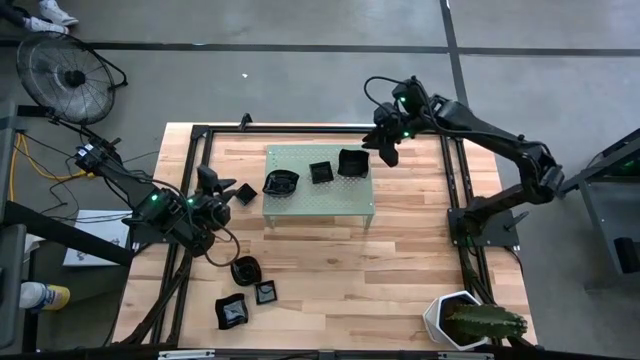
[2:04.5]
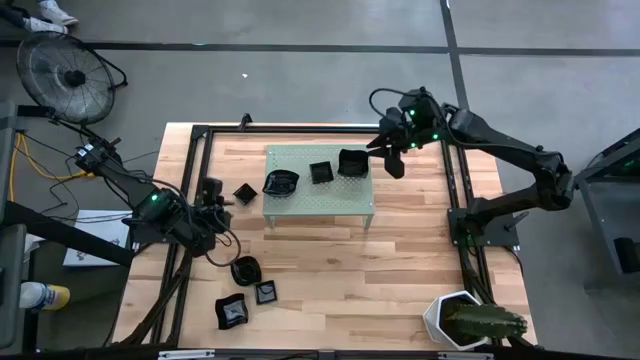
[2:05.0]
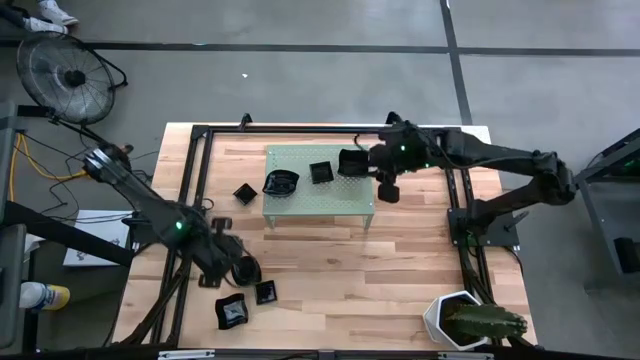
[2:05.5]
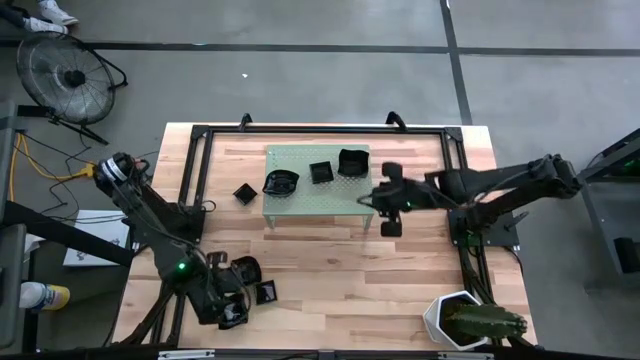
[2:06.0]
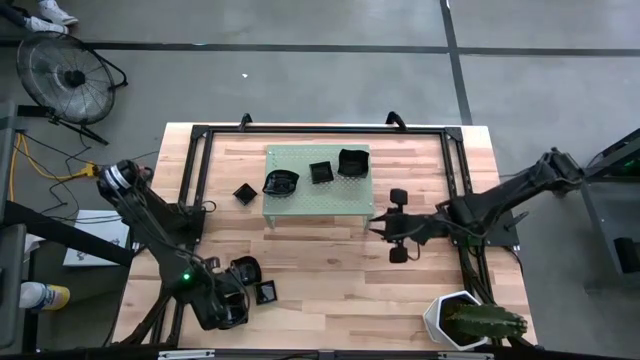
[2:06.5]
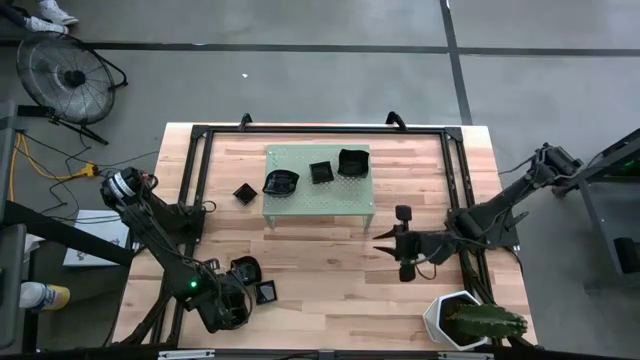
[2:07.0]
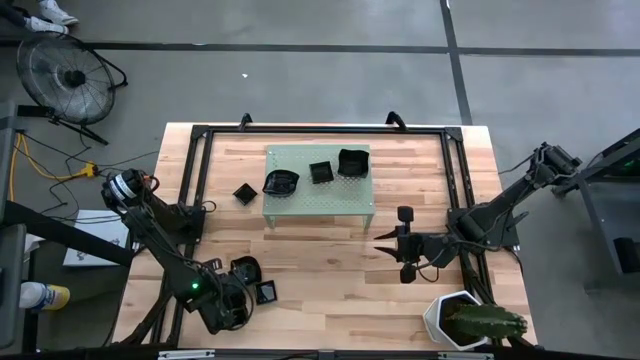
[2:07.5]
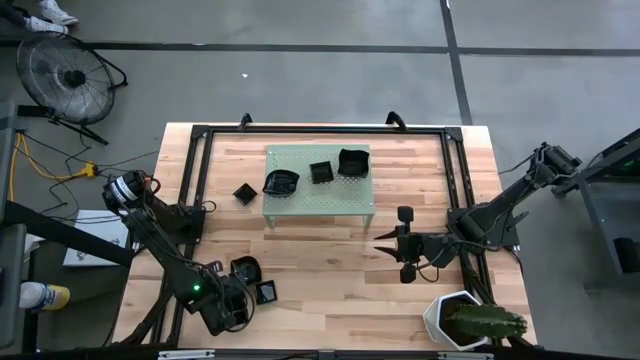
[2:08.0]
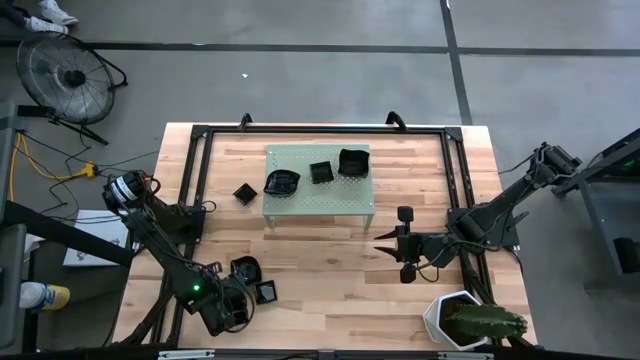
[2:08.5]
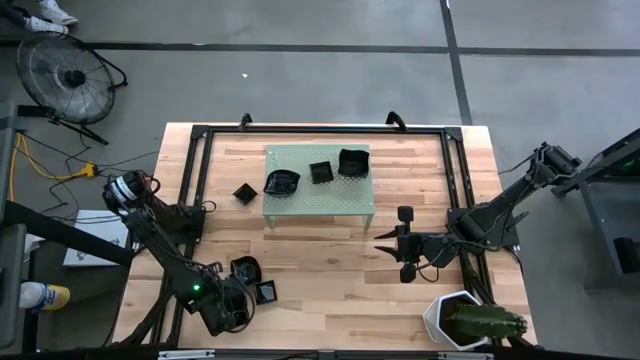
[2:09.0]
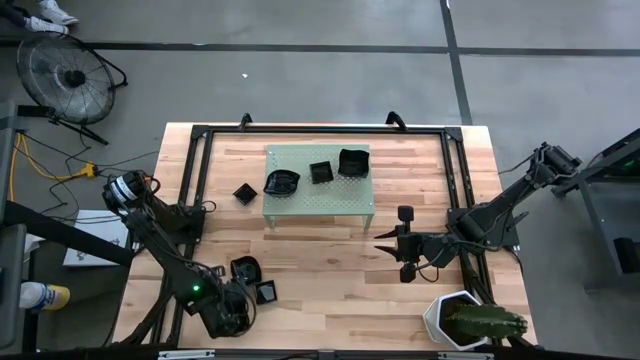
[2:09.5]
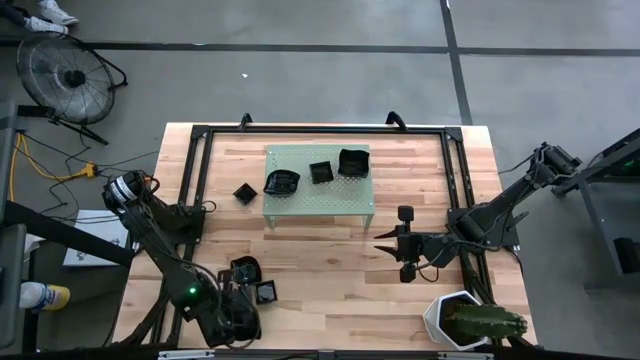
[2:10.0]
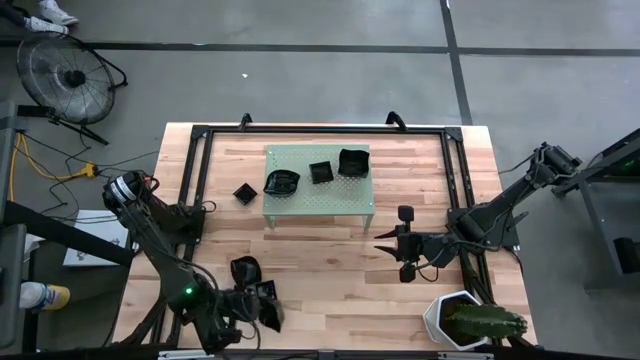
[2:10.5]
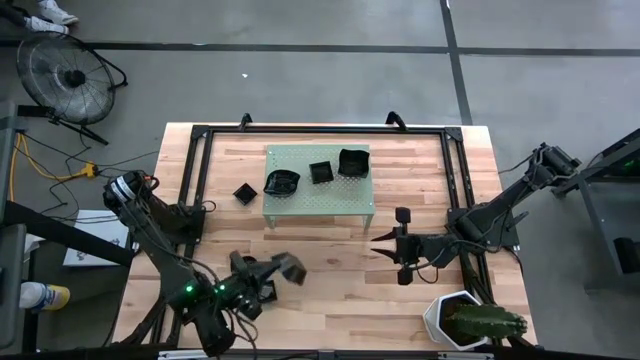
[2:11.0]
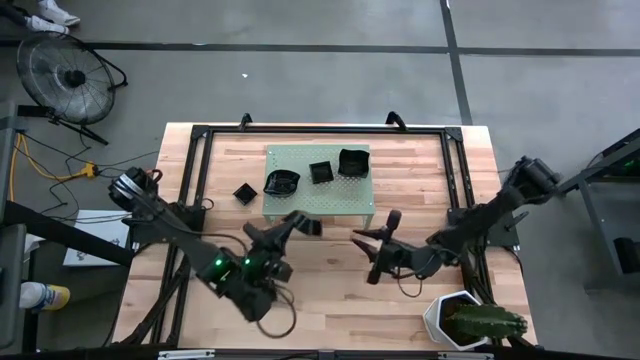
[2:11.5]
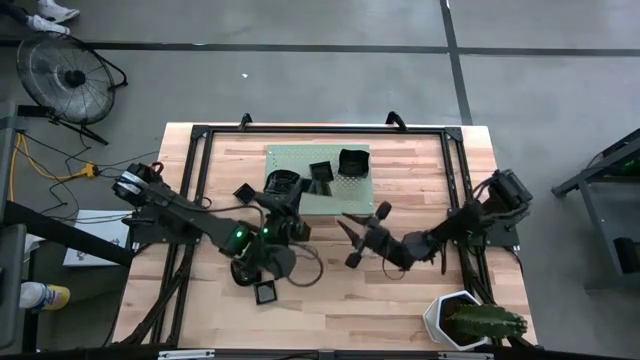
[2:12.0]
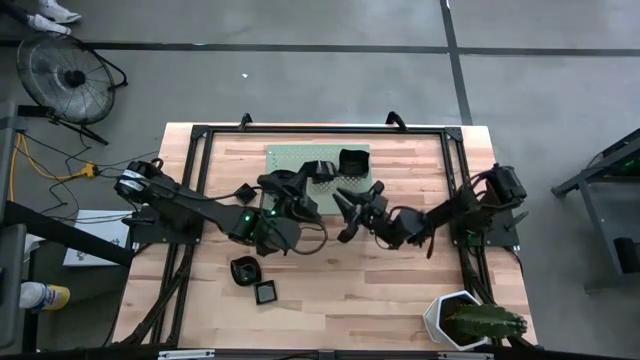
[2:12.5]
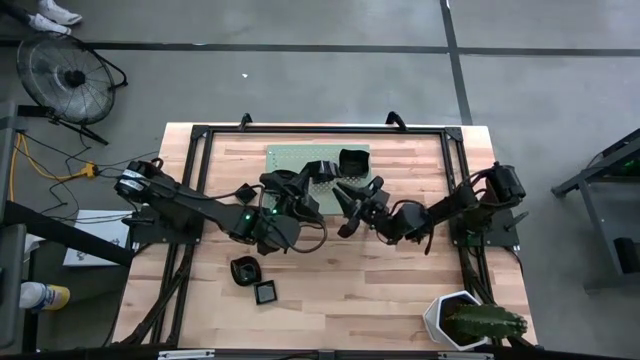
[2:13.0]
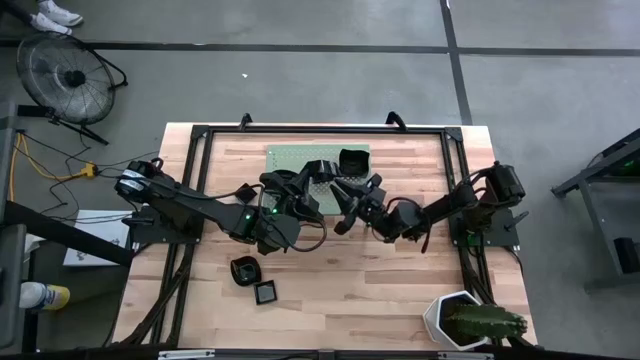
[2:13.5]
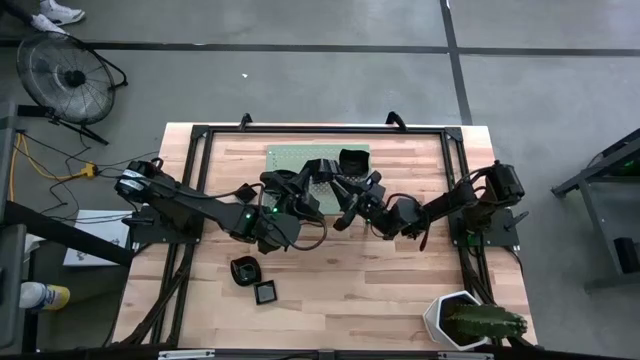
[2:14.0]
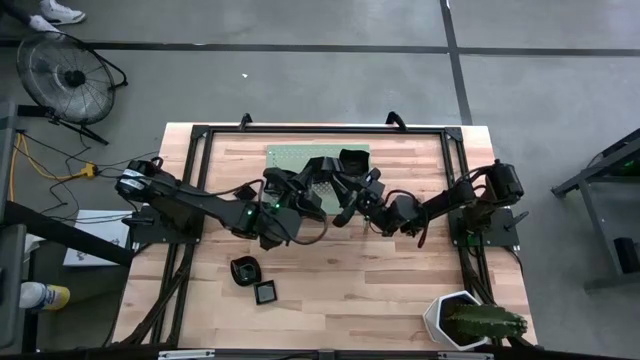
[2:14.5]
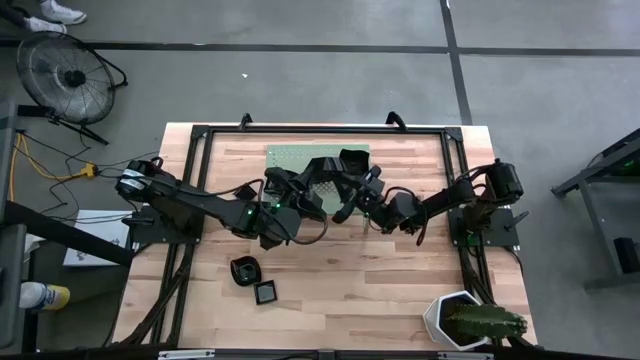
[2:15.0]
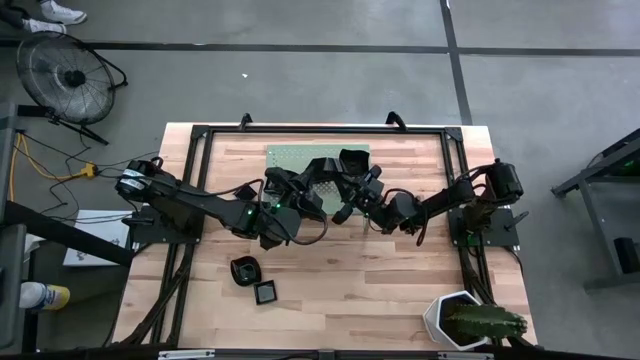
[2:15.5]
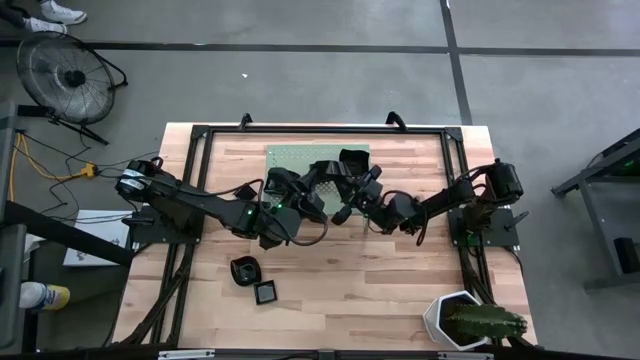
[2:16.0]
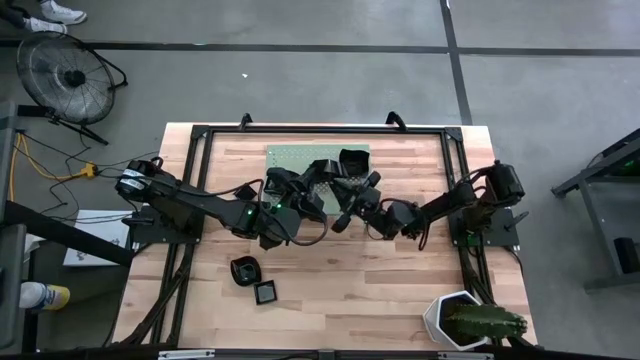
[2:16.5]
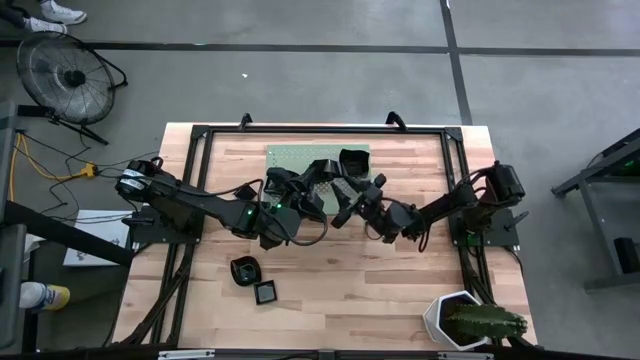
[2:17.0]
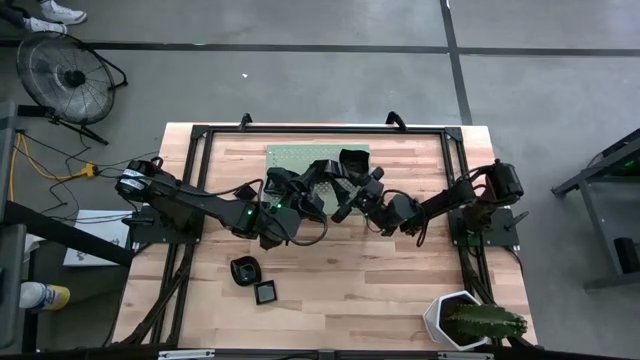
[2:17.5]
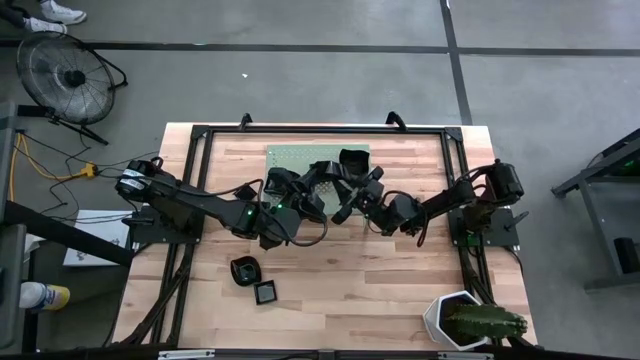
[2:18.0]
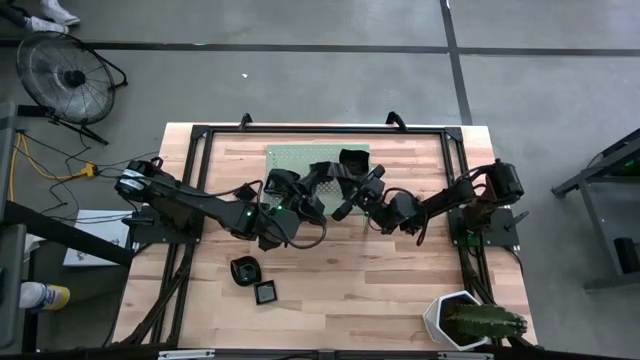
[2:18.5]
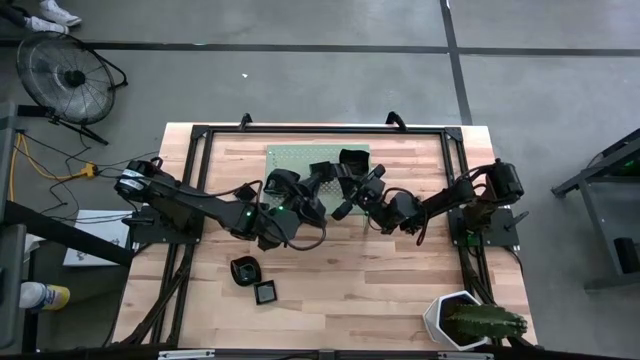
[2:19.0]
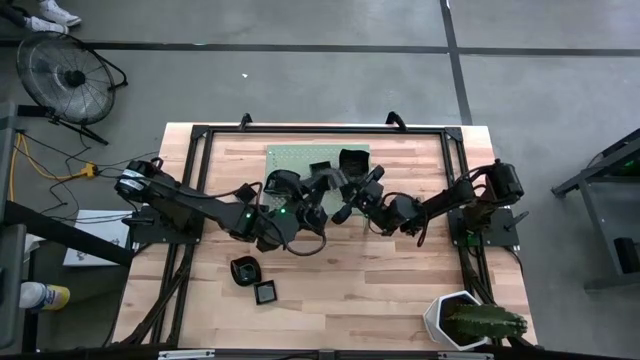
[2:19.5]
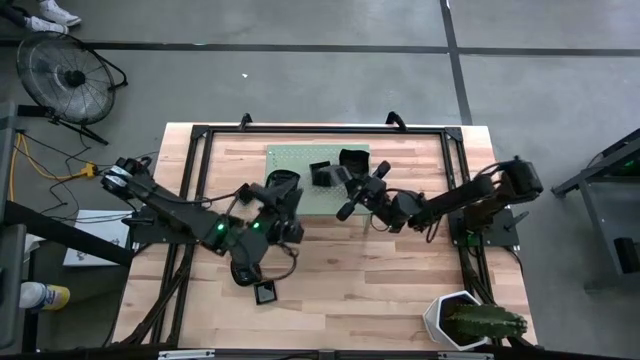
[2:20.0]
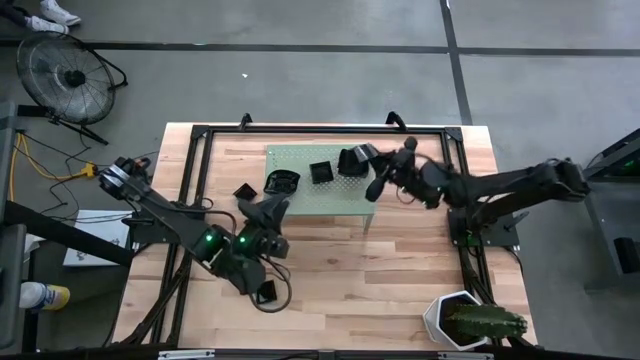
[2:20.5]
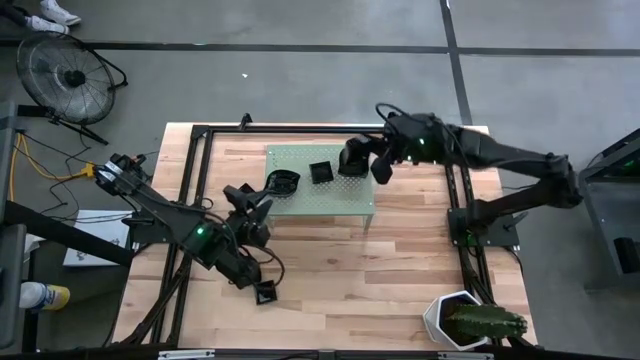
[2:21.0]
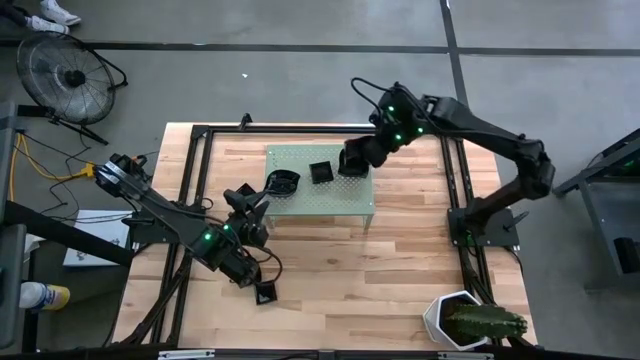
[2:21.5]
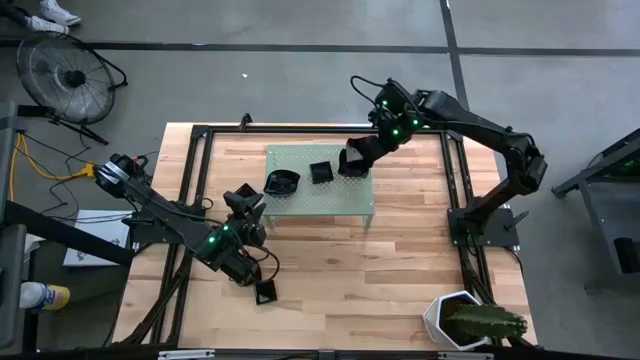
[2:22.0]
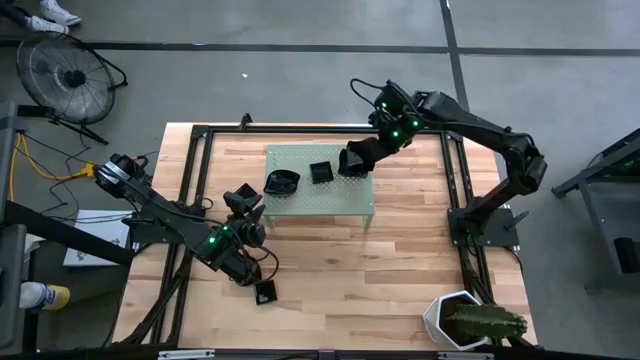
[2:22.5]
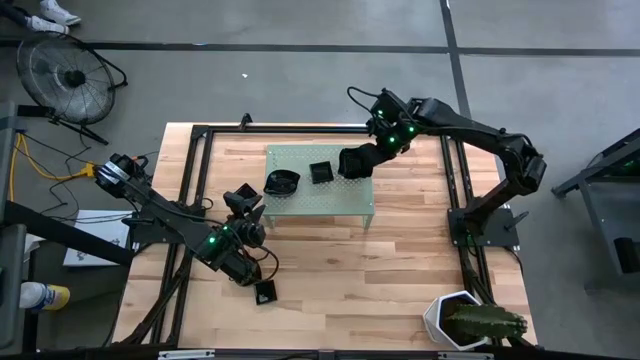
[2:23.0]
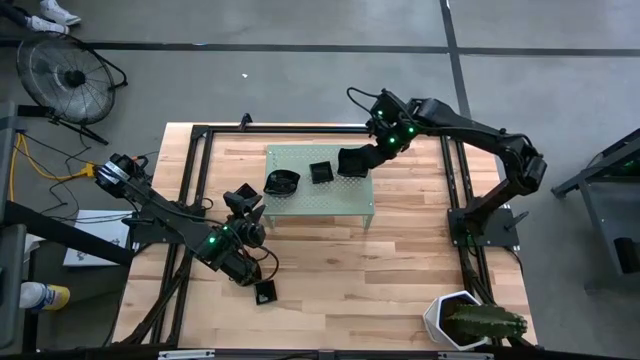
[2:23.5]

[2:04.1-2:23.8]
Task: Pick & Place Mini shaped plates
Stack the distorted square plate on top of the other distorted square plates on the shelf
